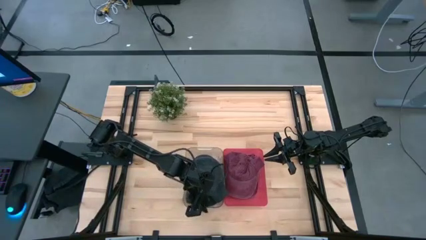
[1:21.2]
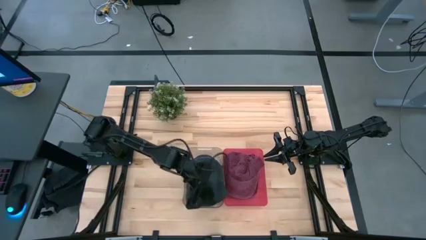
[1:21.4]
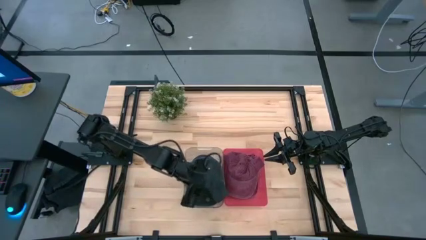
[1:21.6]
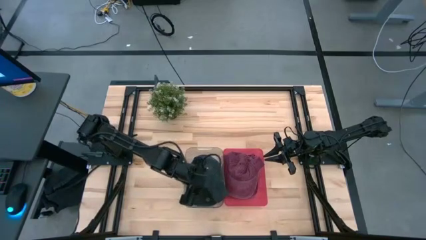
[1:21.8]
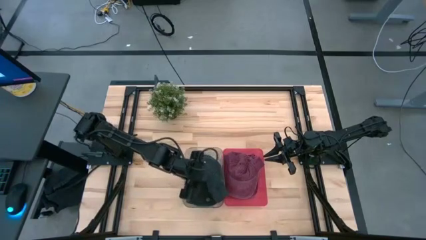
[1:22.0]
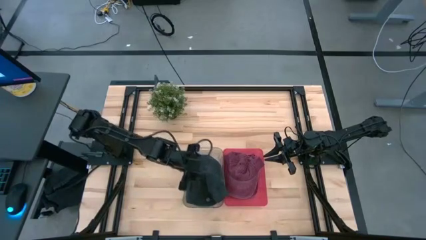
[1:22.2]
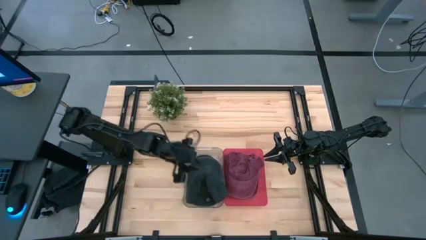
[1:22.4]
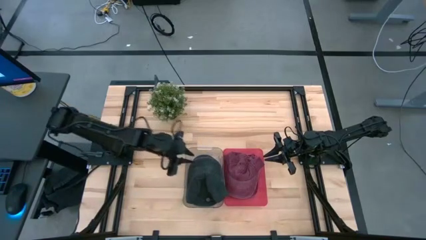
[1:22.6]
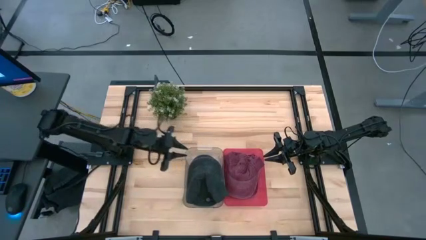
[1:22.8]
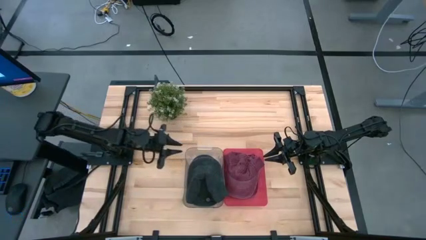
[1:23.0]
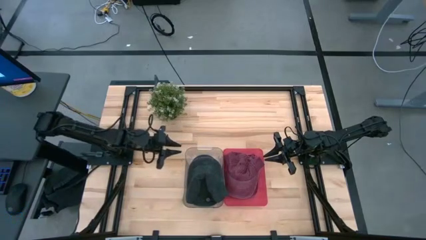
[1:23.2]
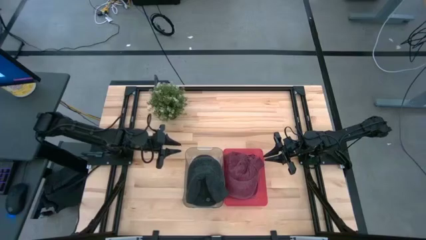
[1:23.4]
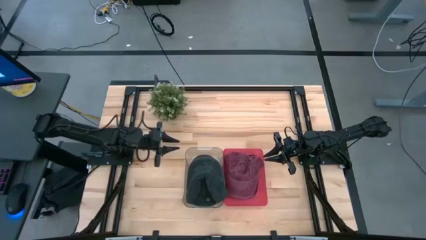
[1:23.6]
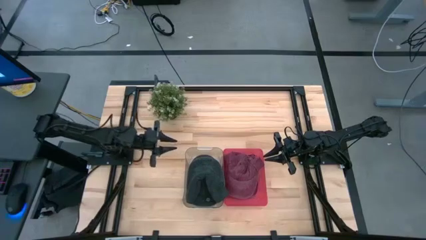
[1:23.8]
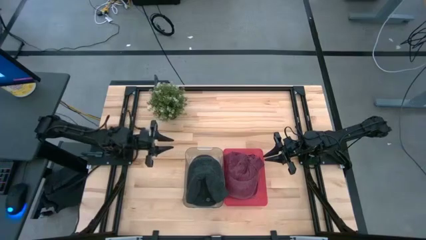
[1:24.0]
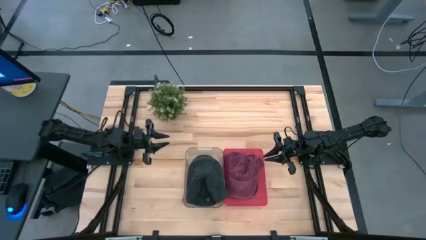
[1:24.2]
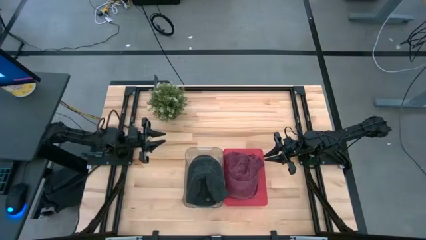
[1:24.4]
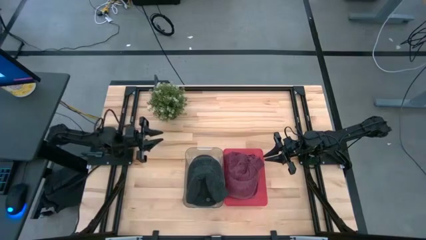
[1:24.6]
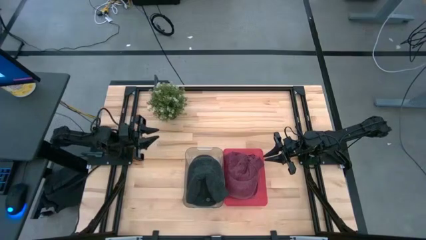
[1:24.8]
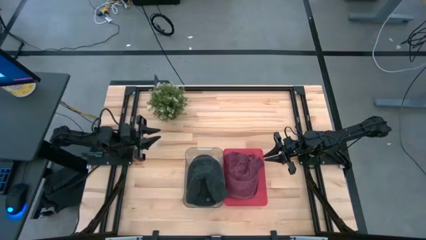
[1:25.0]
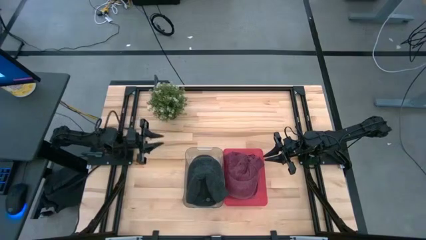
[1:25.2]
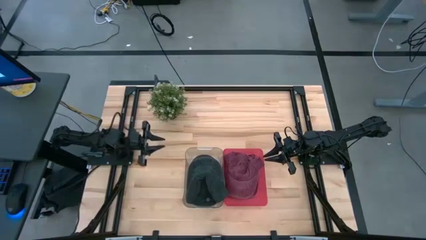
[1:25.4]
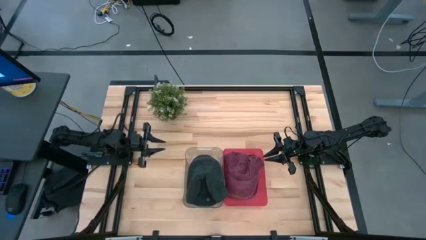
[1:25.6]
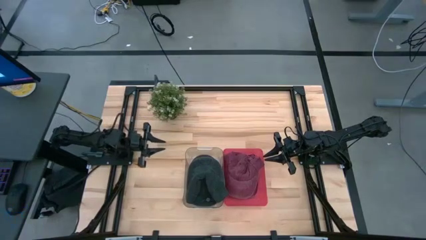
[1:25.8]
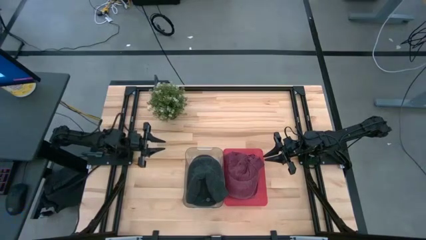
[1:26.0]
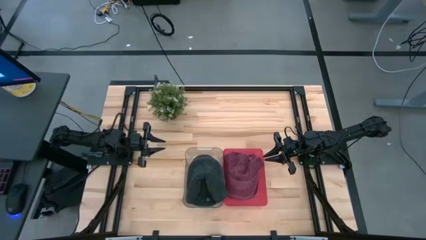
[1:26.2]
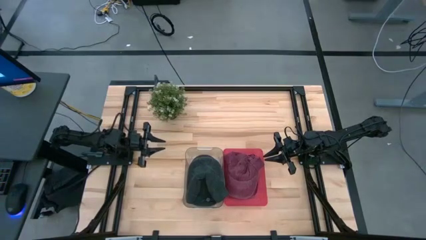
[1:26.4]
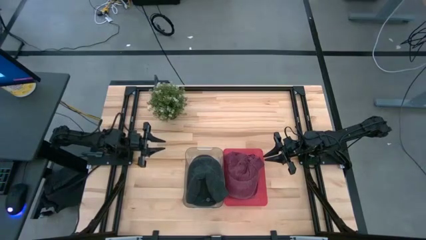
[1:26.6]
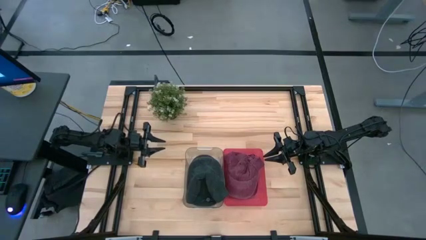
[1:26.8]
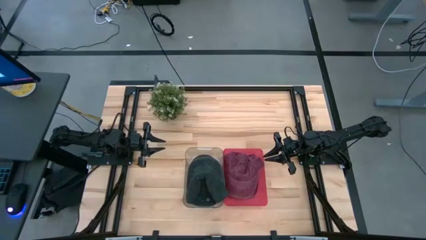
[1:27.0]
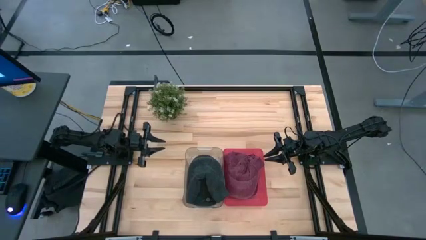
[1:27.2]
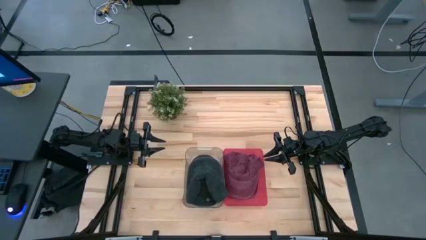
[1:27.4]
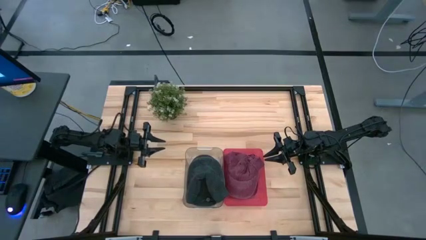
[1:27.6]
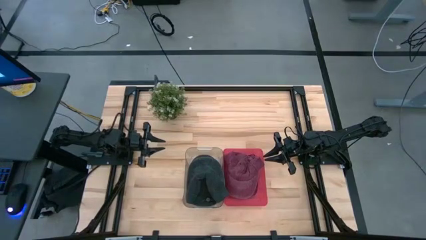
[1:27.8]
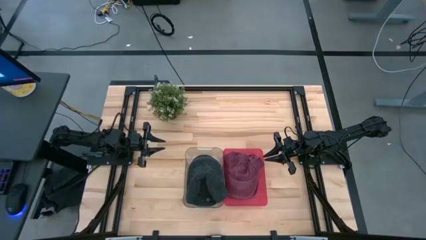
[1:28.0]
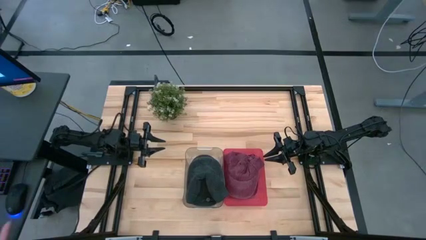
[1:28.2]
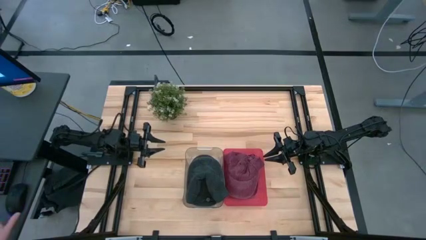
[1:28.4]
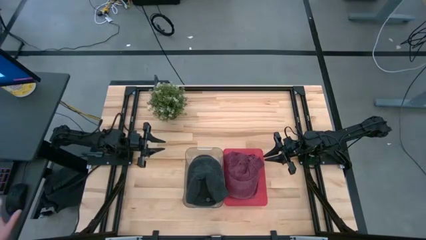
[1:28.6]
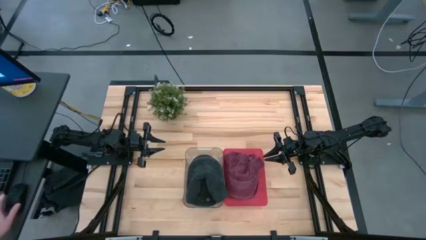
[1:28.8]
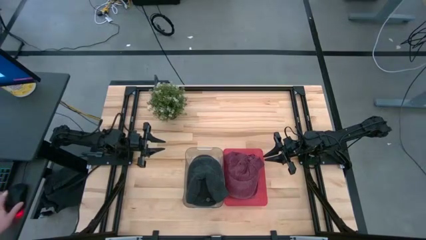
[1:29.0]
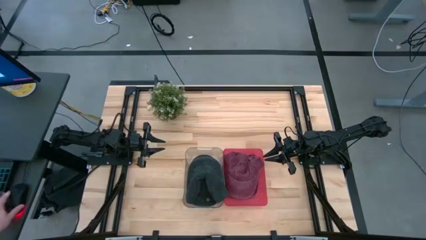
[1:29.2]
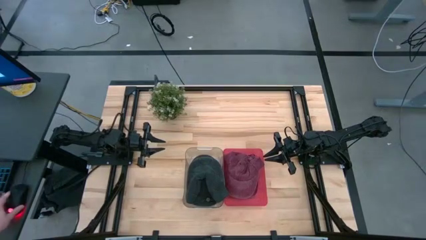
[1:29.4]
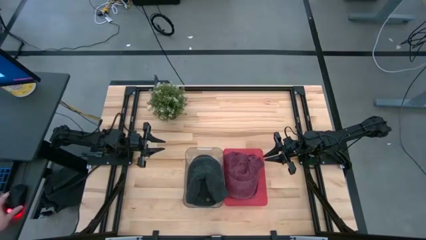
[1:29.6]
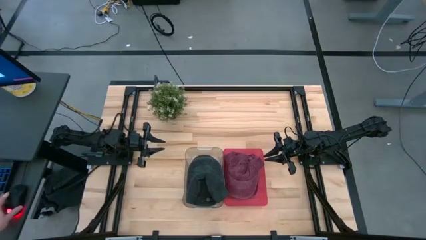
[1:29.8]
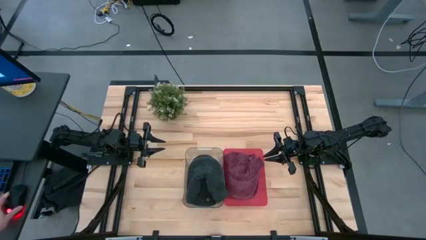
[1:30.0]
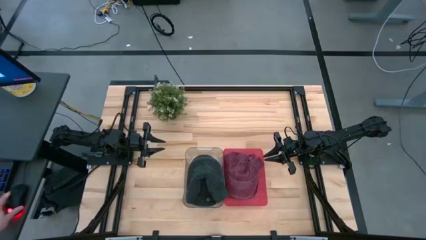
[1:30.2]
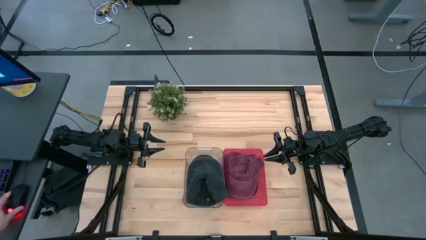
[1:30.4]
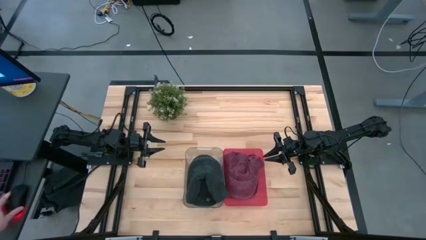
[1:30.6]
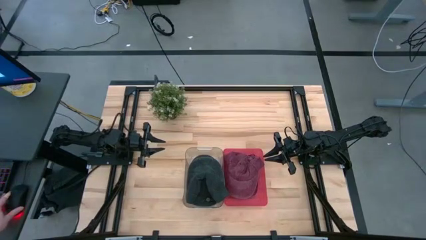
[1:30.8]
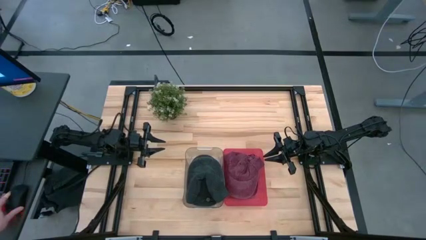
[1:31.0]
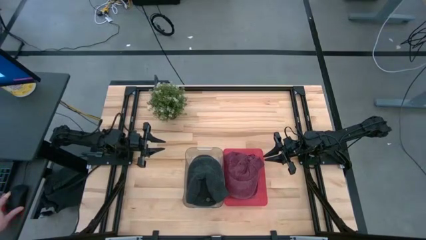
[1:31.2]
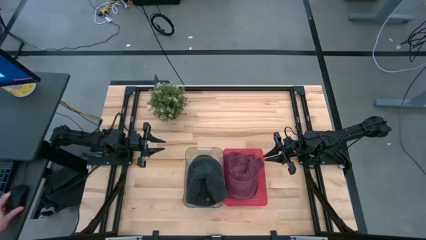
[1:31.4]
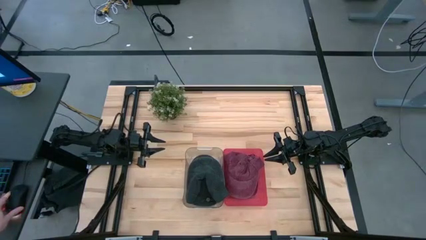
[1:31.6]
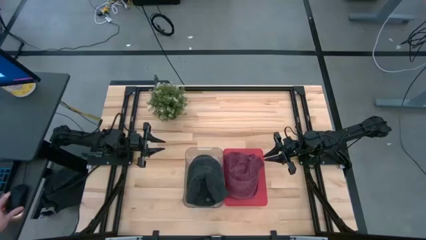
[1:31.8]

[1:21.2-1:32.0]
Task: Pick & Place hat
Return to Home Position
